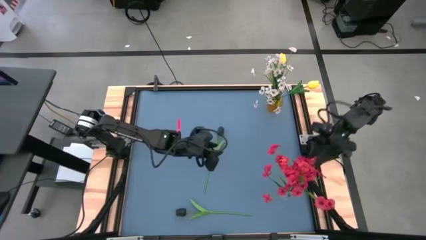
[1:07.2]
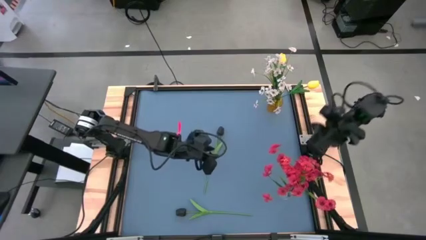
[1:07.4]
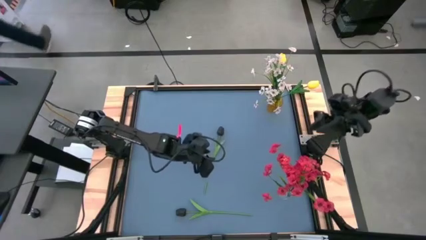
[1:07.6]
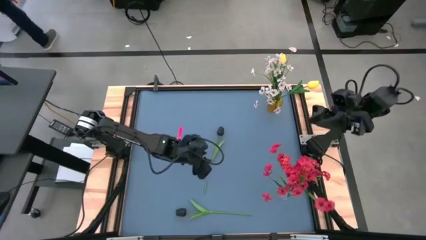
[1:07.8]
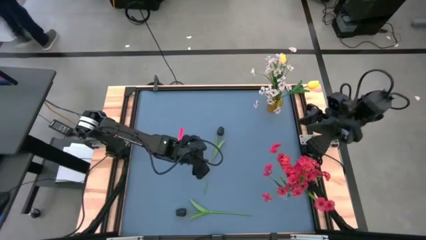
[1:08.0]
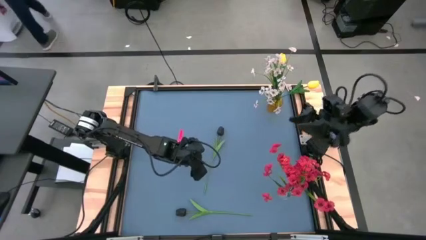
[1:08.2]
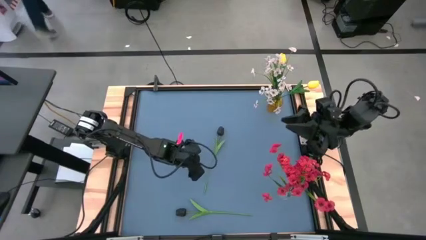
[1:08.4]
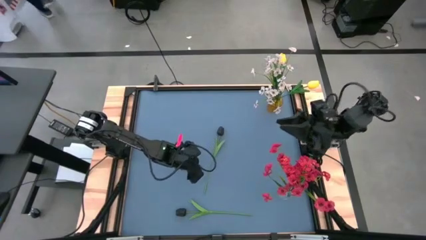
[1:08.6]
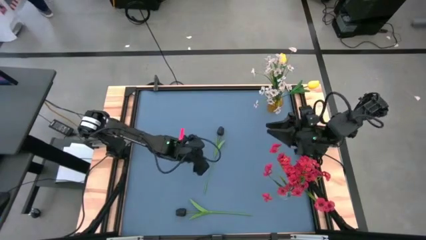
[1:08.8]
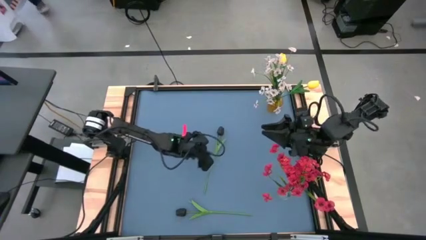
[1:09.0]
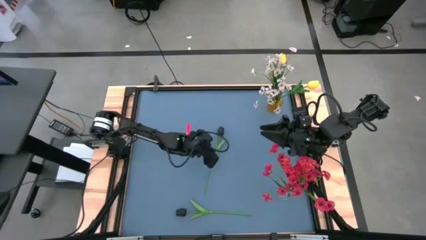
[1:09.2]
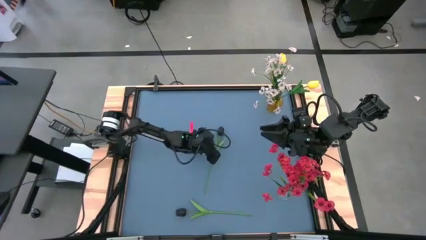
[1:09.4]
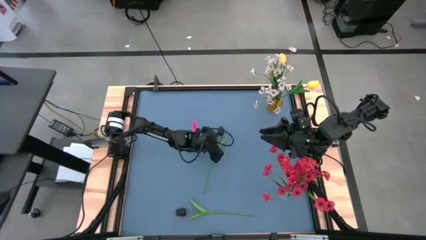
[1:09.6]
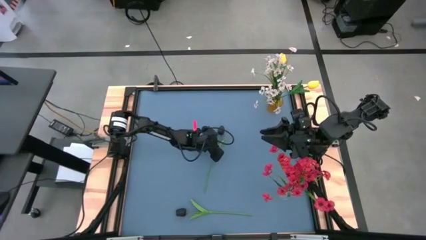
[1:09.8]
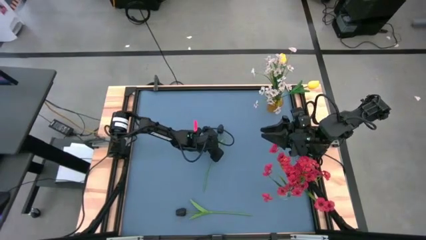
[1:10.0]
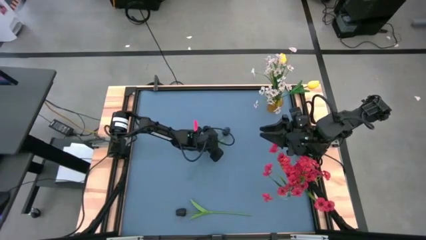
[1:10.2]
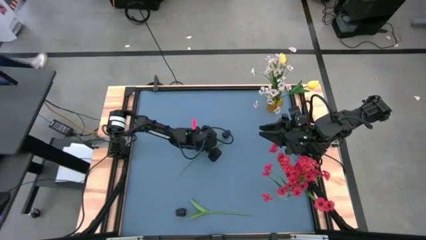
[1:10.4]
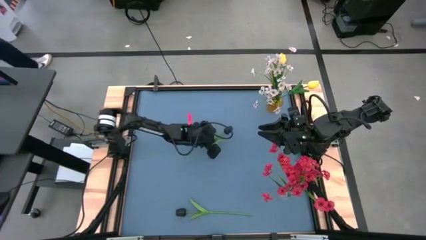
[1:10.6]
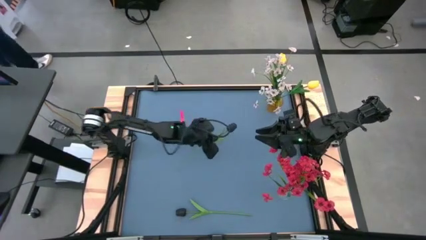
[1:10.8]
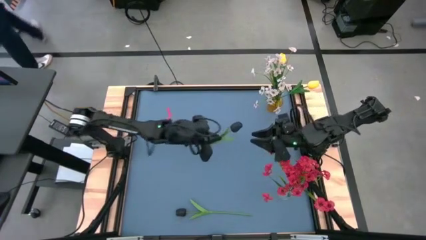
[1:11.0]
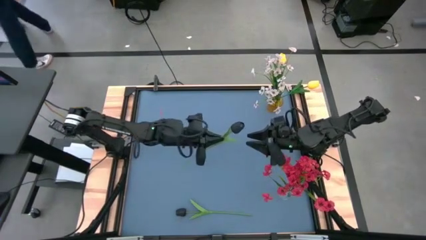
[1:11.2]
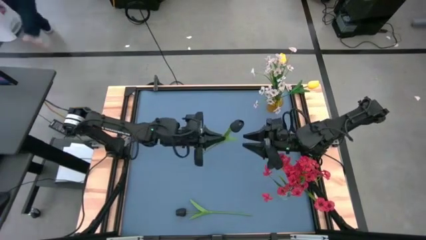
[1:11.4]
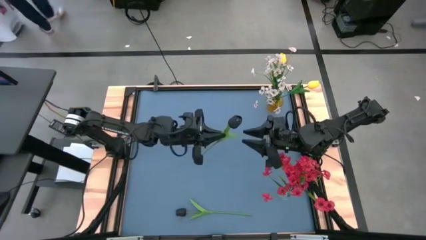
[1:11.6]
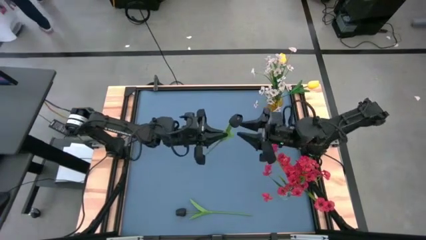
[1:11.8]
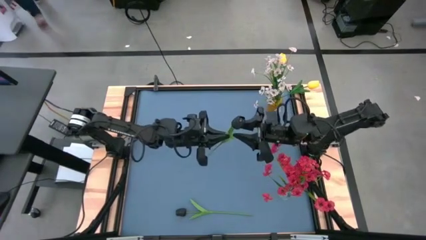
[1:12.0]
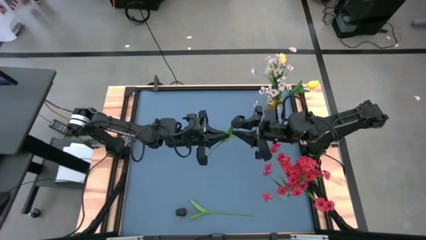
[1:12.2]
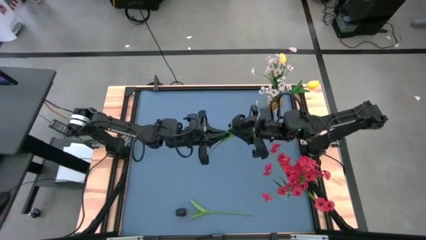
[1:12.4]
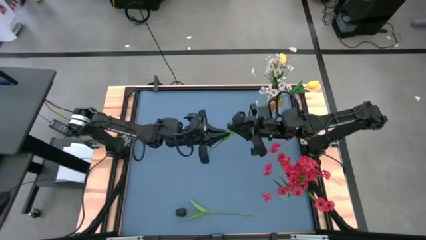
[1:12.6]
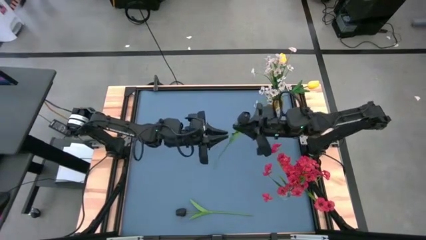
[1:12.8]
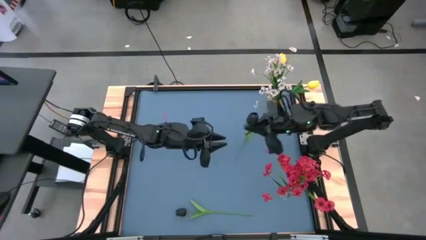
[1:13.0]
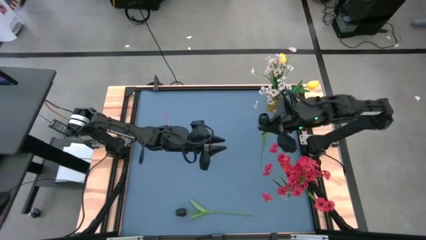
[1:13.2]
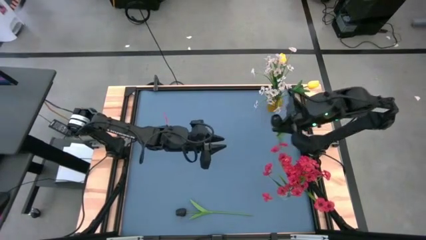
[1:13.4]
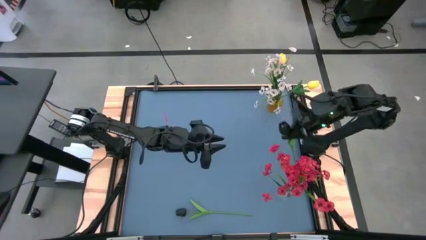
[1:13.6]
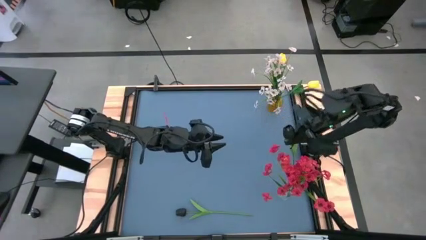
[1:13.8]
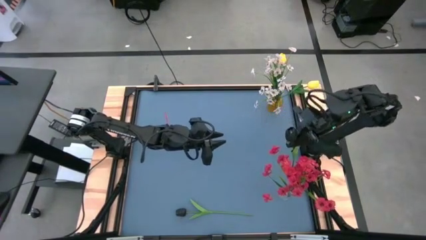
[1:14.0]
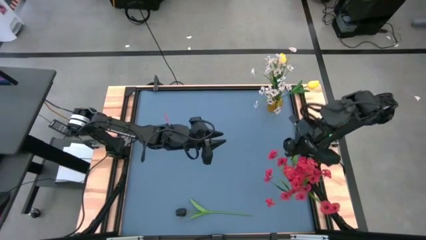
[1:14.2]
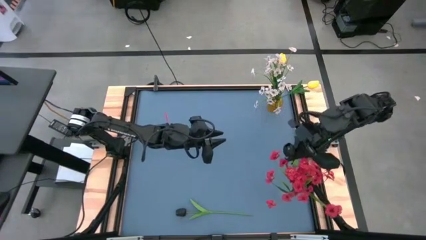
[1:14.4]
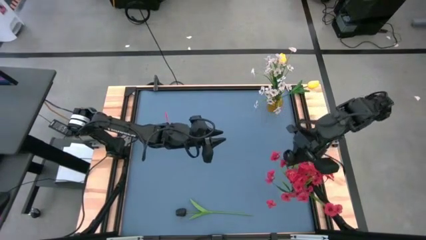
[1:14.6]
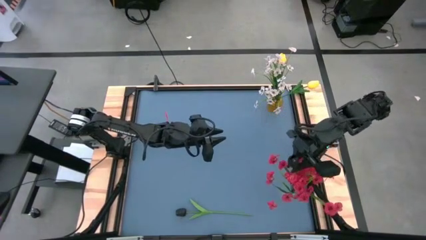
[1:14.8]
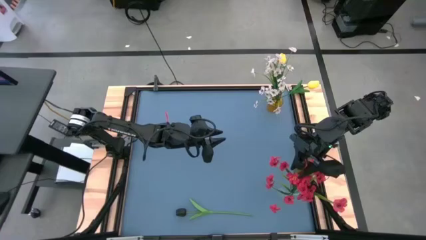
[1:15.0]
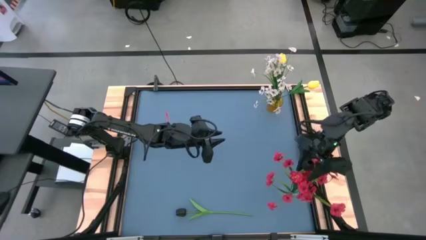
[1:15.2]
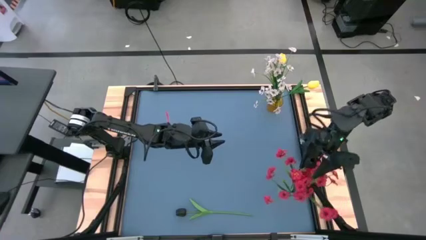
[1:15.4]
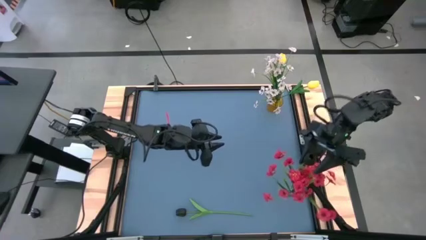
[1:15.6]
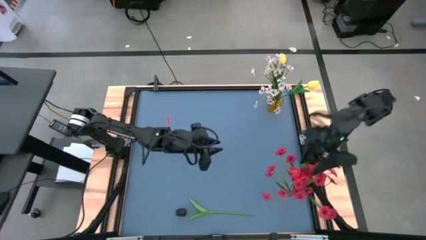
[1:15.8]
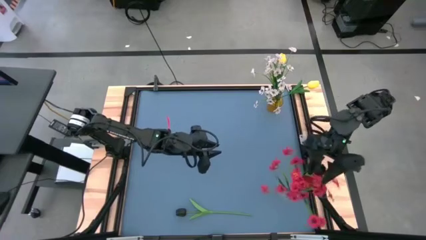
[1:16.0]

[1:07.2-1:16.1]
Task: Sort flowers into vase by color
Put the top black flower into the transparent vase

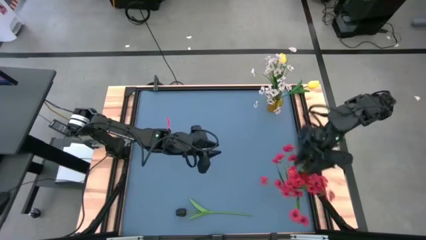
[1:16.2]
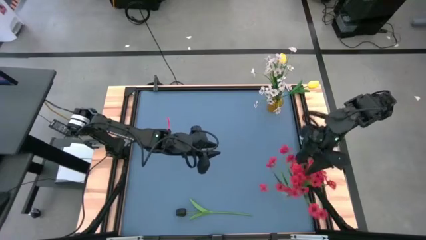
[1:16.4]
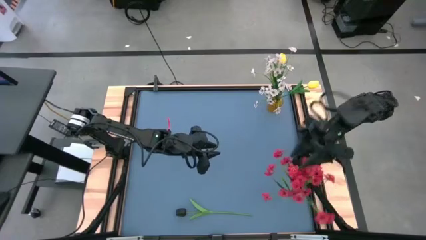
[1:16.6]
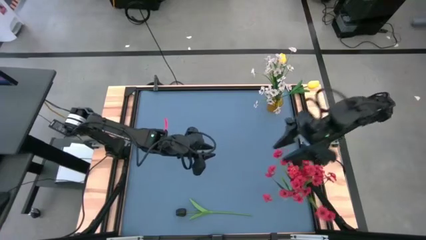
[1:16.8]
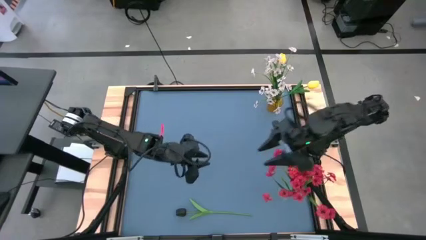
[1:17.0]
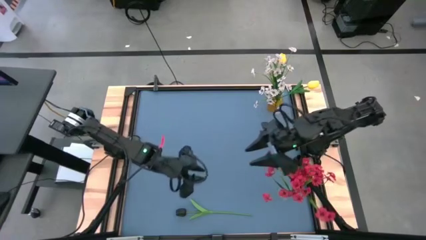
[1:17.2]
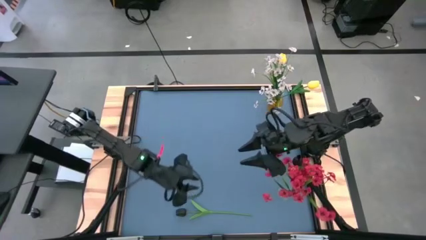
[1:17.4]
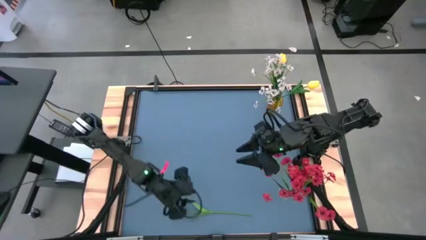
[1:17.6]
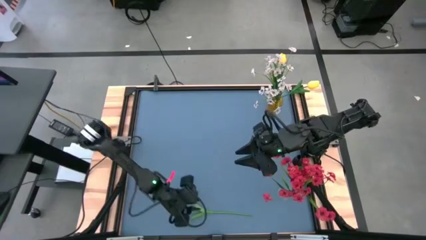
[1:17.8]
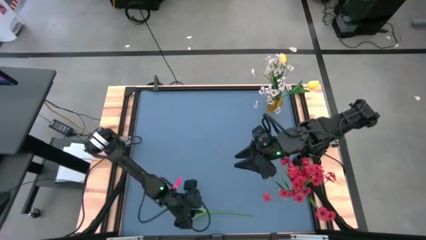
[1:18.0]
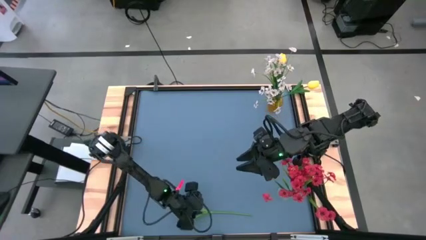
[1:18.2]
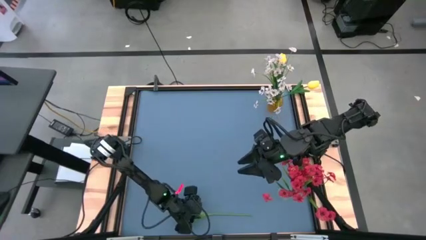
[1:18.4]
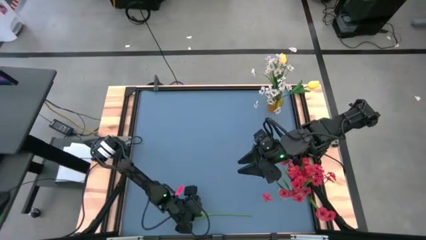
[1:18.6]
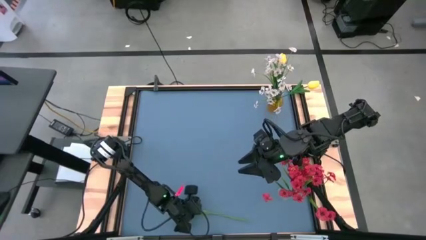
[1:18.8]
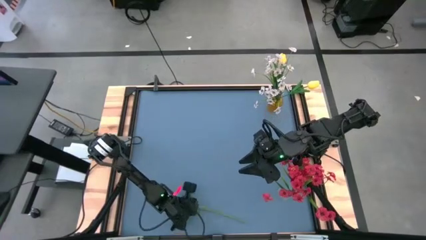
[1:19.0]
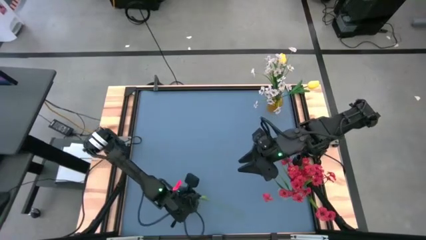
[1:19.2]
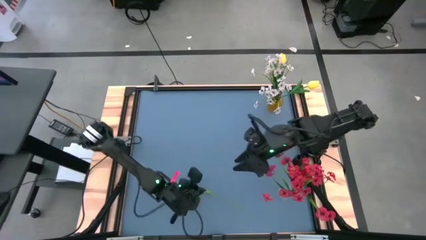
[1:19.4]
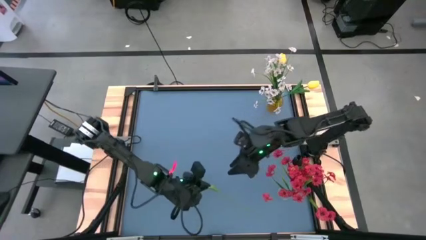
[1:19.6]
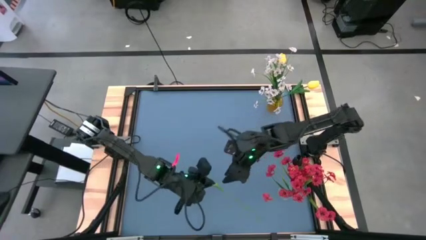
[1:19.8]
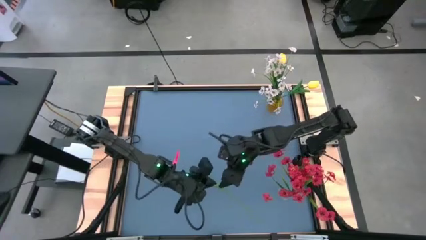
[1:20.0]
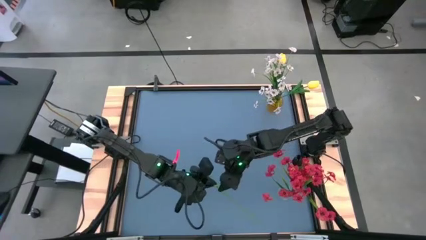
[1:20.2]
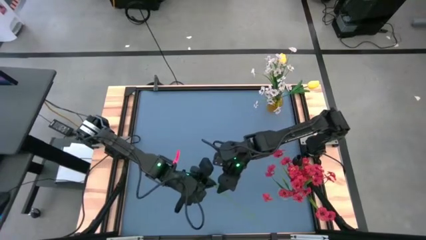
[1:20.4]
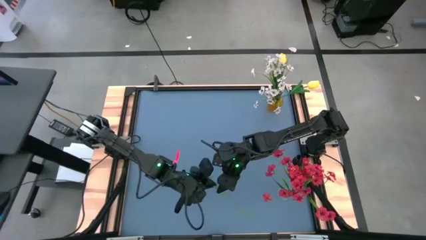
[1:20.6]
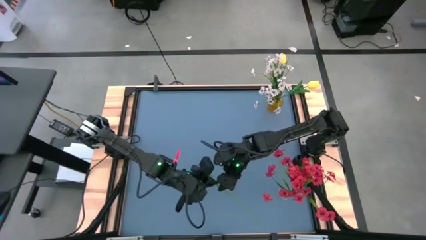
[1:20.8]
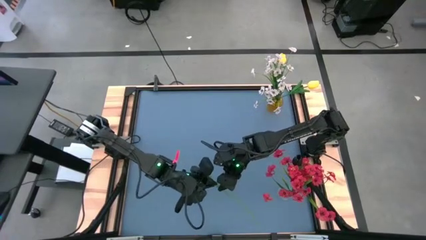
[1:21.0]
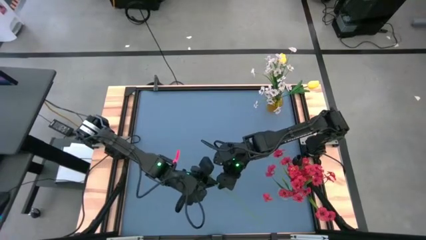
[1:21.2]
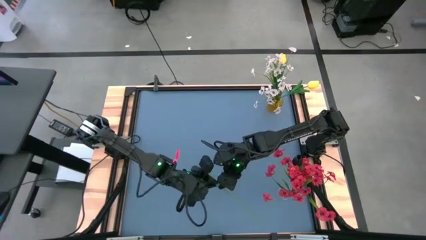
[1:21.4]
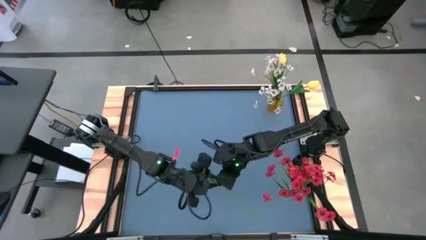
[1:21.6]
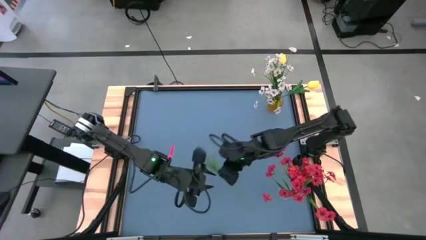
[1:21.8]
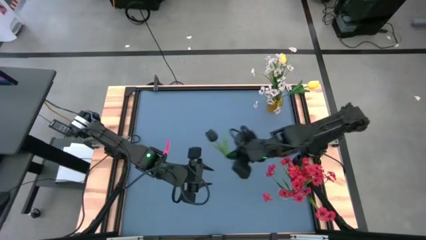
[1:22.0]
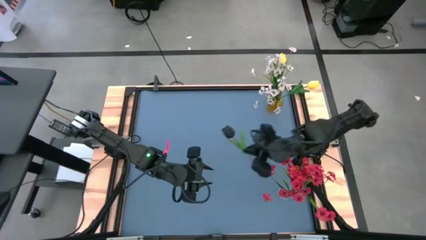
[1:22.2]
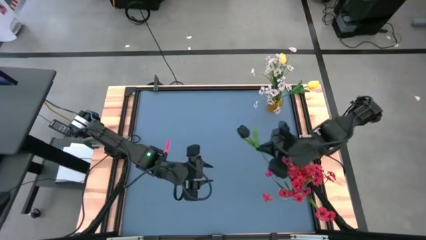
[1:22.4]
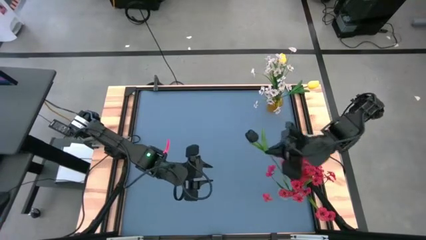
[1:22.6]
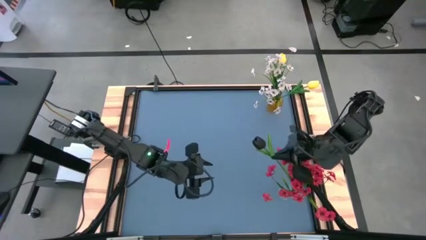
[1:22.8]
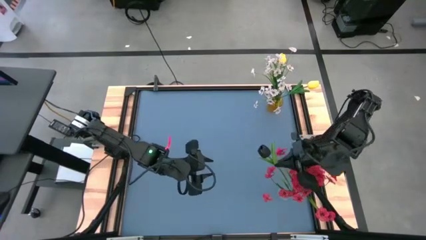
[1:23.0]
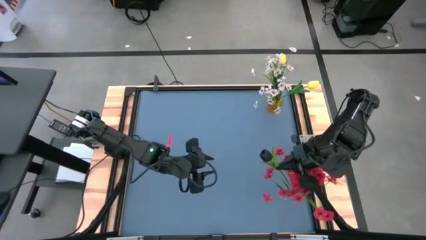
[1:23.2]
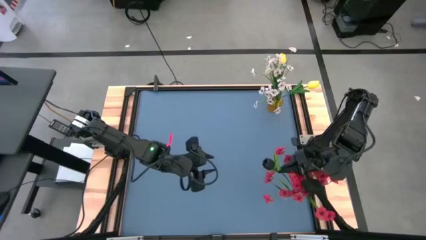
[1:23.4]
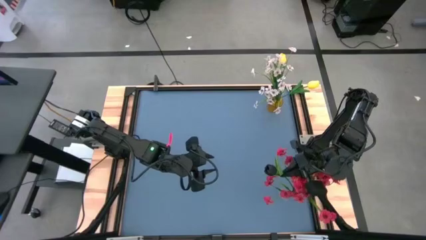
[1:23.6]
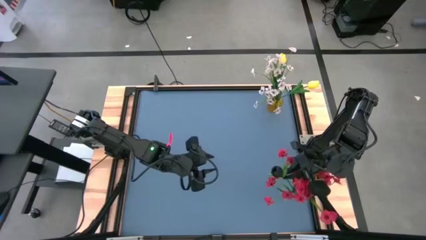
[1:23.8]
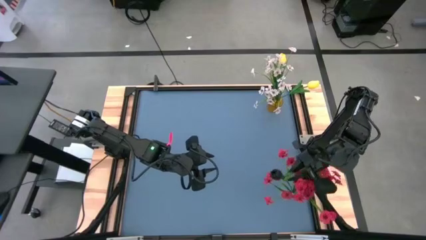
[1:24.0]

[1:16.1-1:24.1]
Put the black tulip flower into the transparent vase
